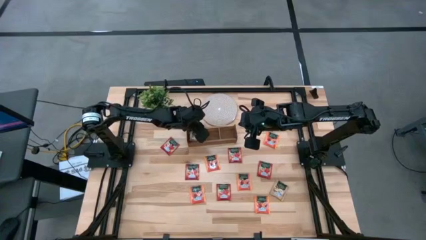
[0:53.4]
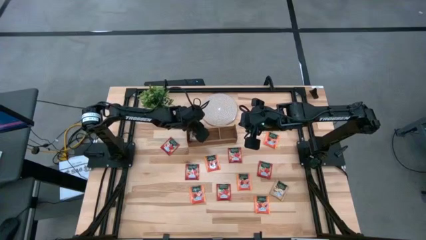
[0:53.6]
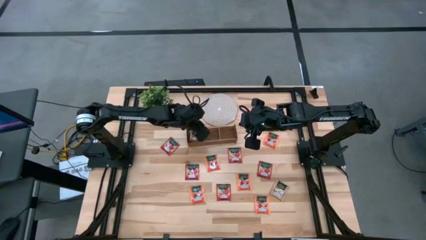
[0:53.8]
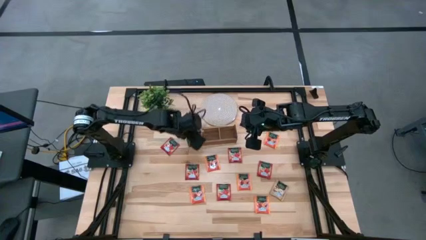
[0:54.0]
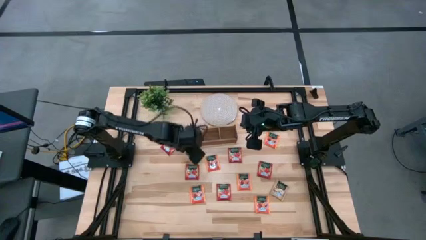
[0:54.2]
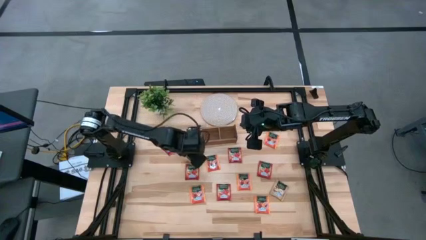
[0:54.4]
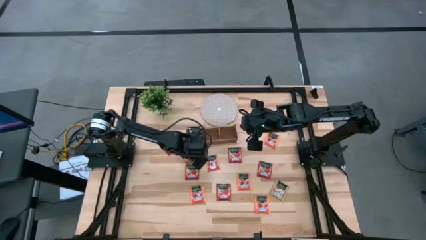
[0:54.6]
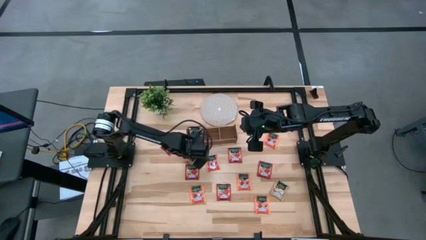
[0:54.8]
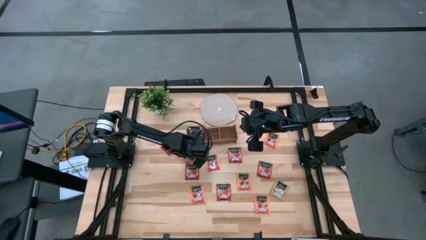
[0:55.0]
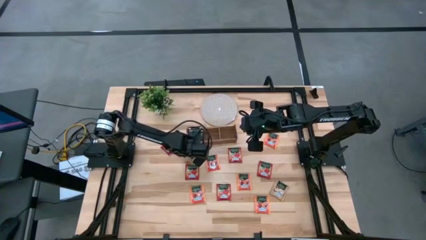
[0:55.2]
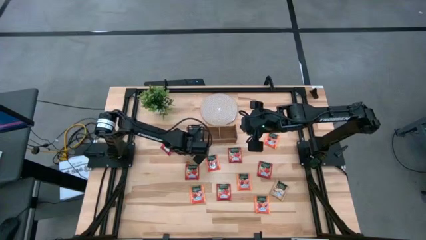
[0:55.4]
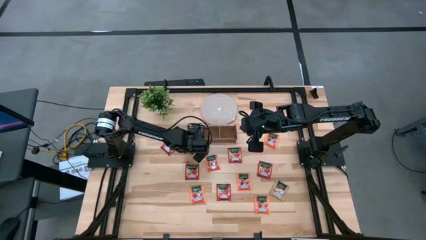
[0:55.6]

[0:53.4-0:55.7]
Task: Pick & Place Tea
Adjust the wooden organizer

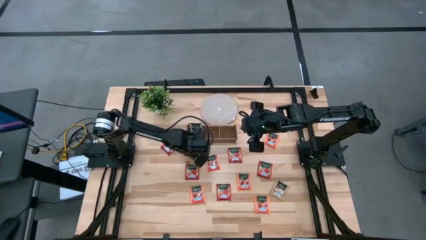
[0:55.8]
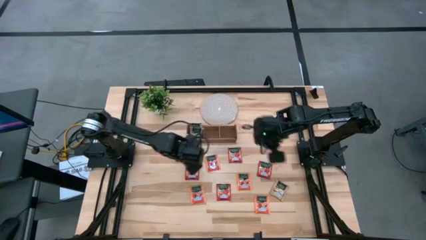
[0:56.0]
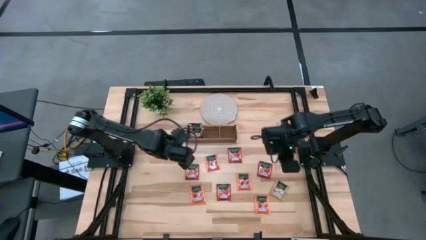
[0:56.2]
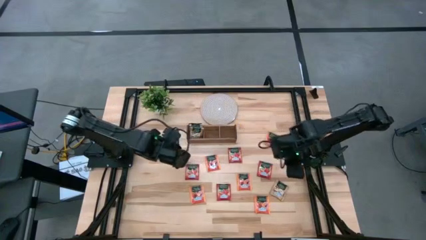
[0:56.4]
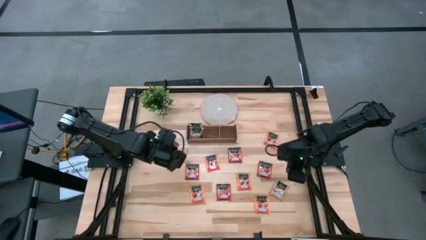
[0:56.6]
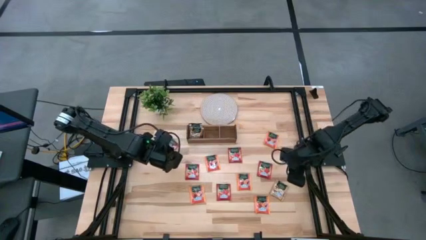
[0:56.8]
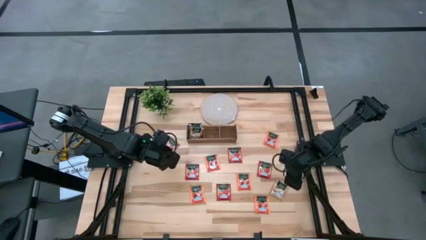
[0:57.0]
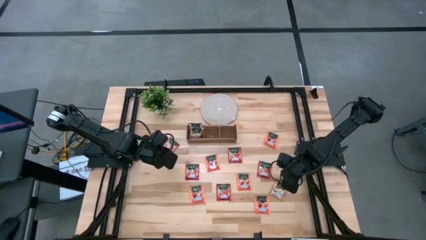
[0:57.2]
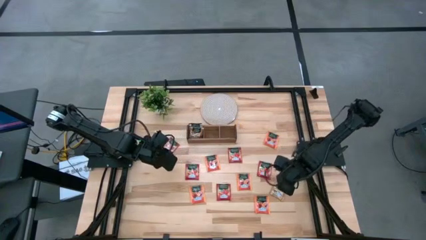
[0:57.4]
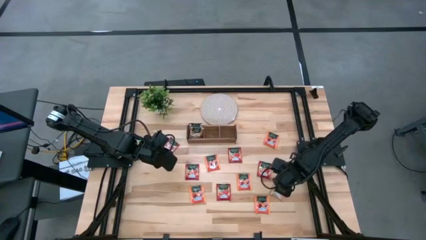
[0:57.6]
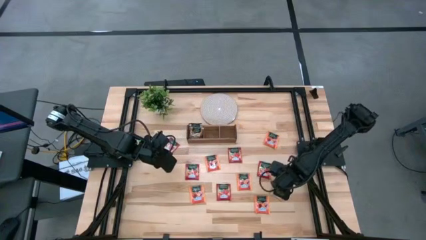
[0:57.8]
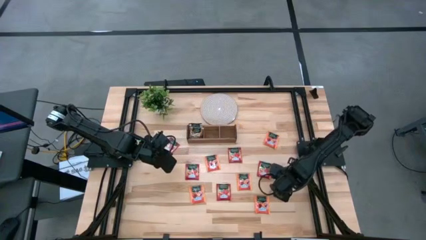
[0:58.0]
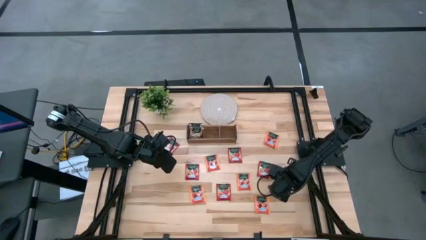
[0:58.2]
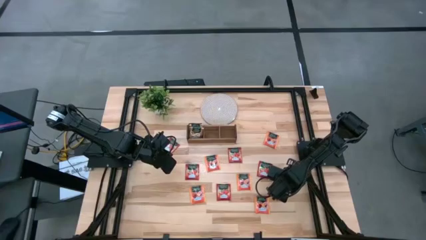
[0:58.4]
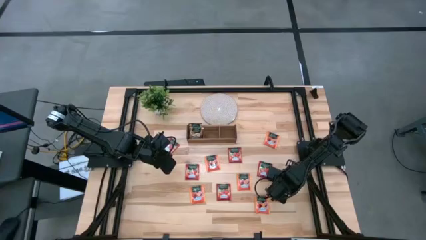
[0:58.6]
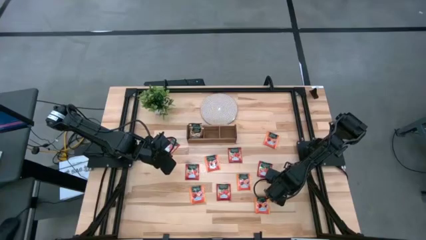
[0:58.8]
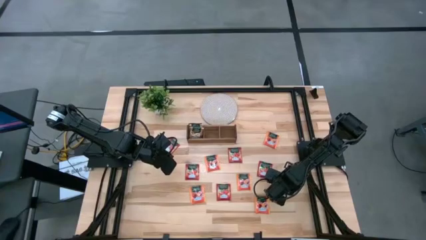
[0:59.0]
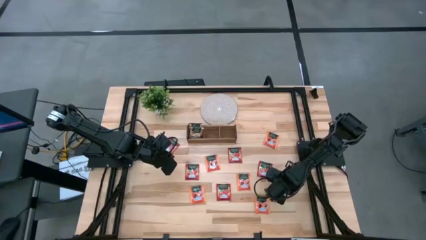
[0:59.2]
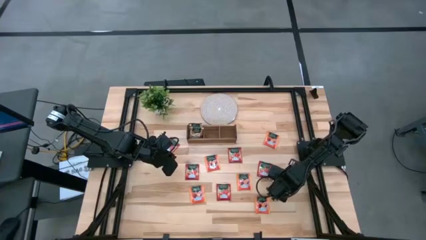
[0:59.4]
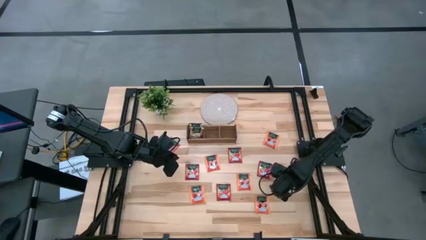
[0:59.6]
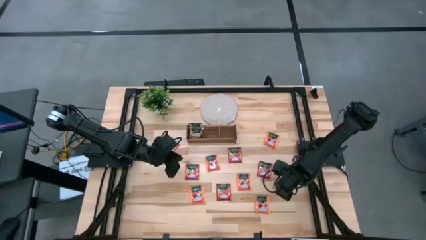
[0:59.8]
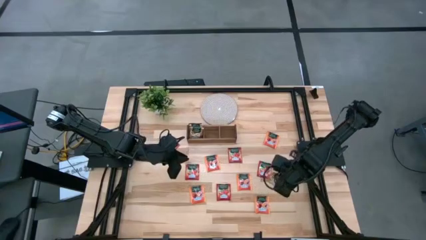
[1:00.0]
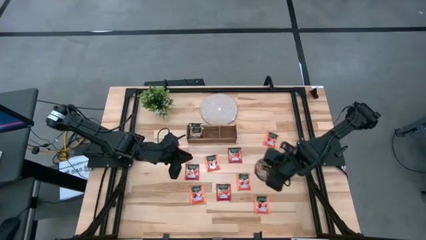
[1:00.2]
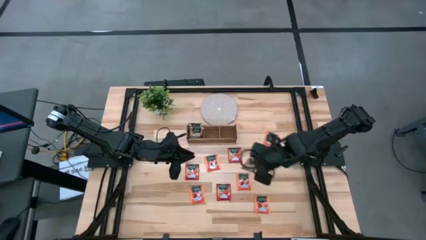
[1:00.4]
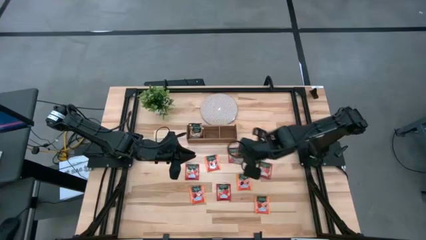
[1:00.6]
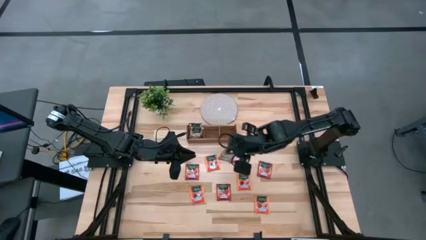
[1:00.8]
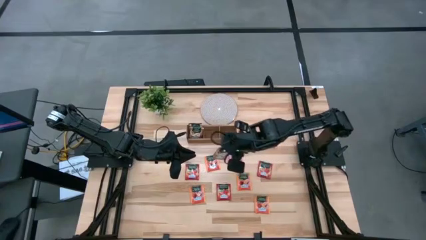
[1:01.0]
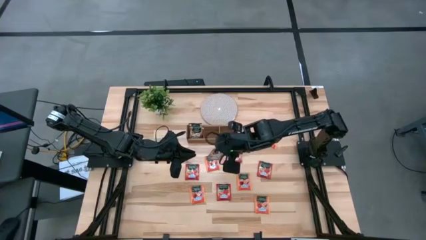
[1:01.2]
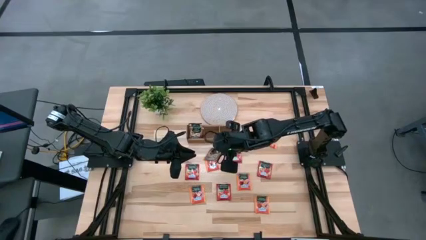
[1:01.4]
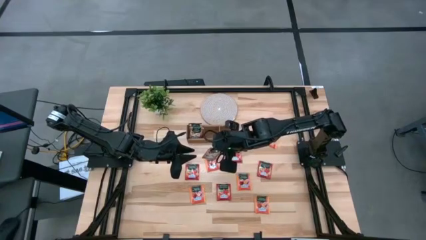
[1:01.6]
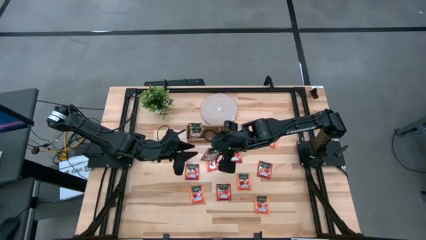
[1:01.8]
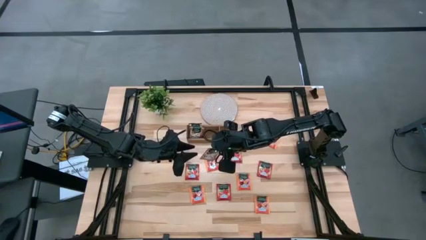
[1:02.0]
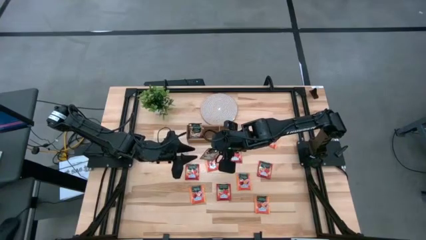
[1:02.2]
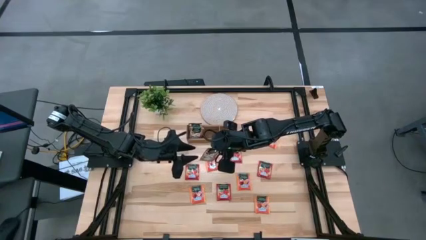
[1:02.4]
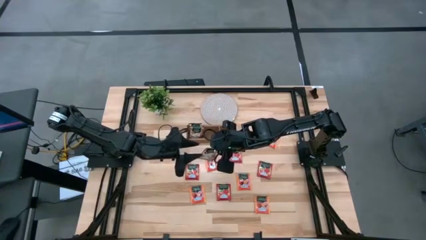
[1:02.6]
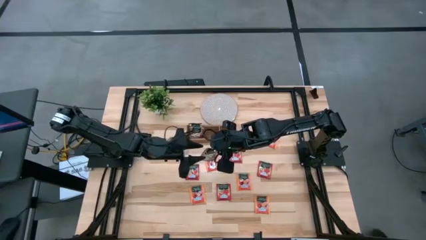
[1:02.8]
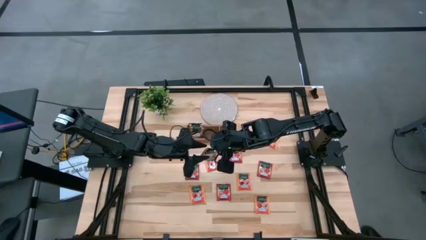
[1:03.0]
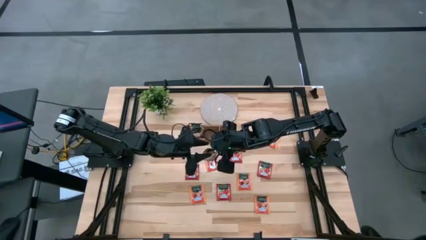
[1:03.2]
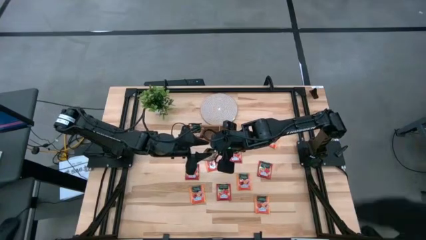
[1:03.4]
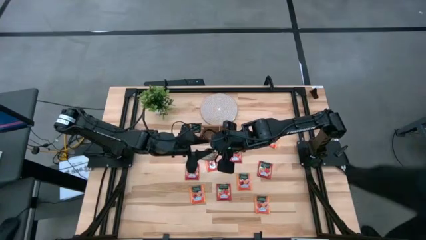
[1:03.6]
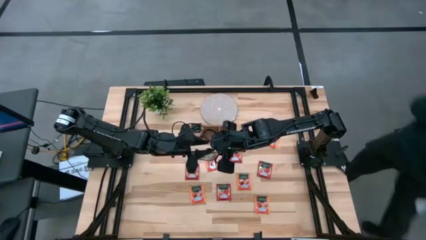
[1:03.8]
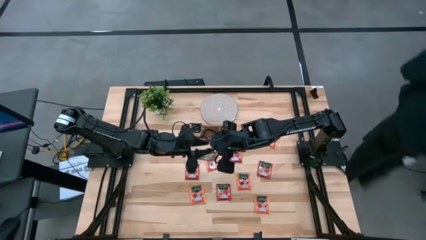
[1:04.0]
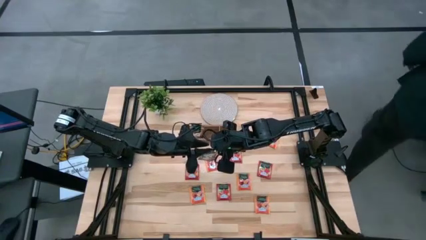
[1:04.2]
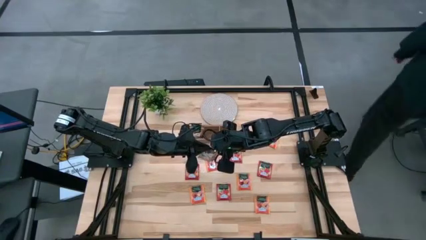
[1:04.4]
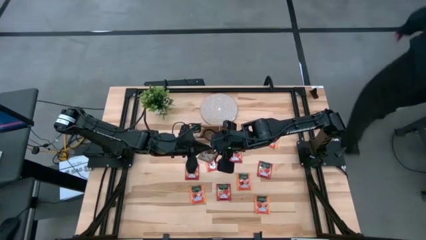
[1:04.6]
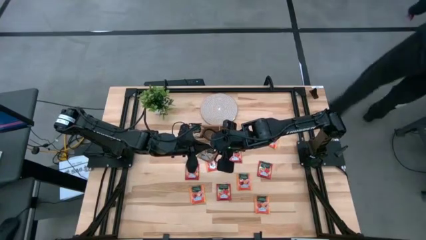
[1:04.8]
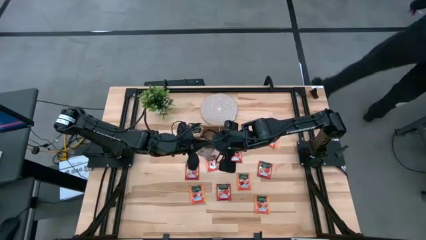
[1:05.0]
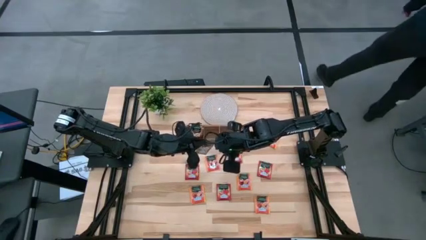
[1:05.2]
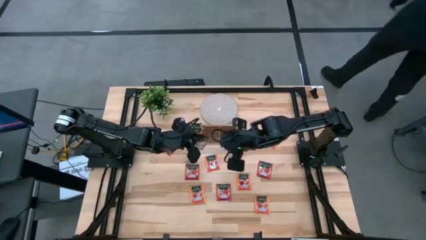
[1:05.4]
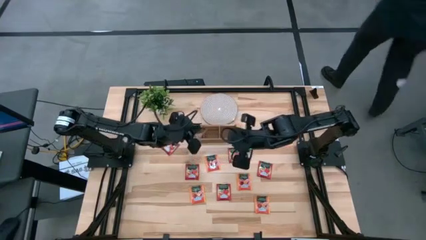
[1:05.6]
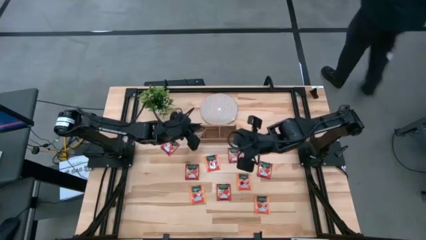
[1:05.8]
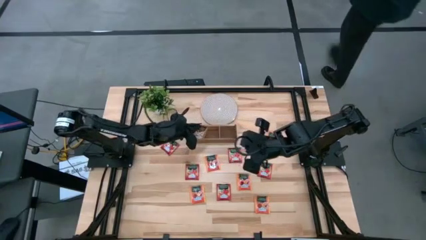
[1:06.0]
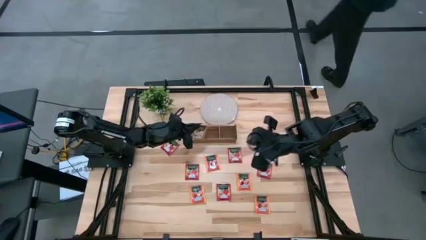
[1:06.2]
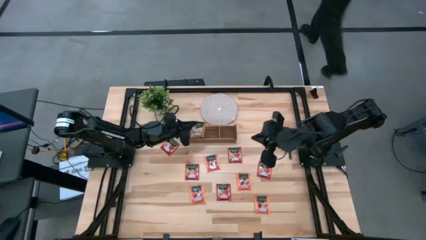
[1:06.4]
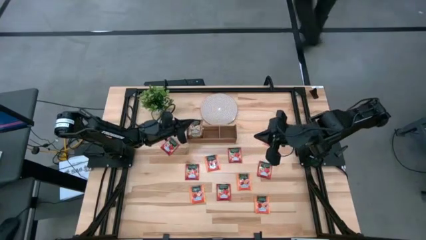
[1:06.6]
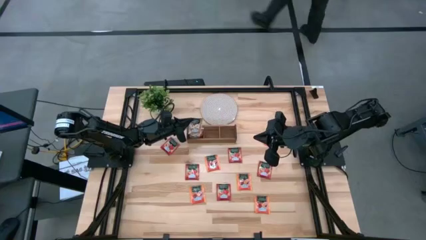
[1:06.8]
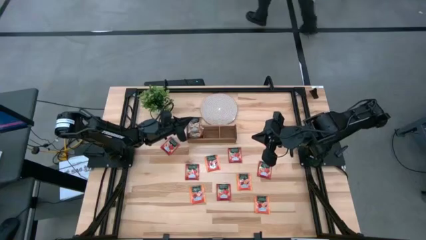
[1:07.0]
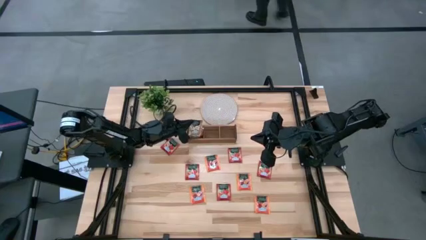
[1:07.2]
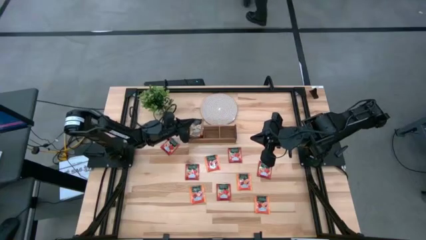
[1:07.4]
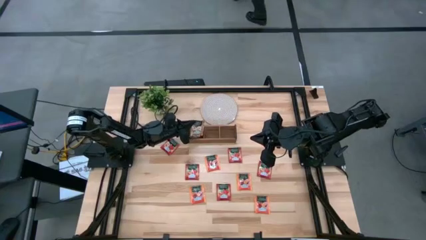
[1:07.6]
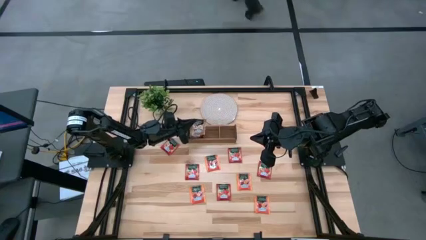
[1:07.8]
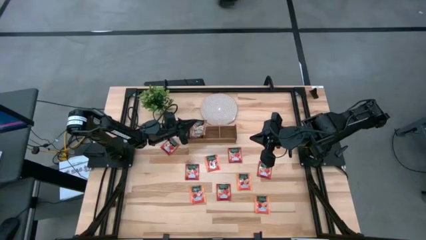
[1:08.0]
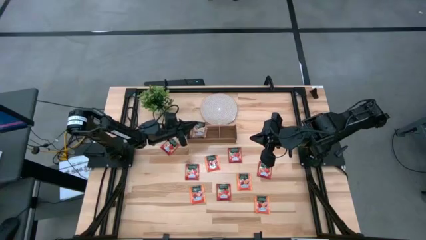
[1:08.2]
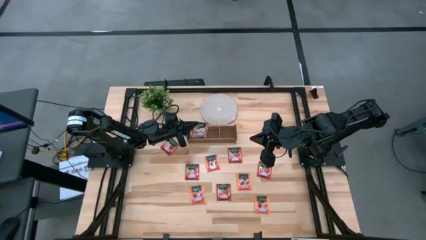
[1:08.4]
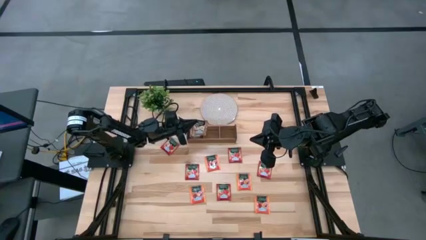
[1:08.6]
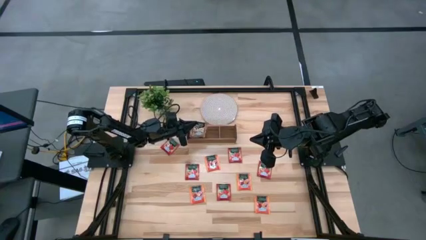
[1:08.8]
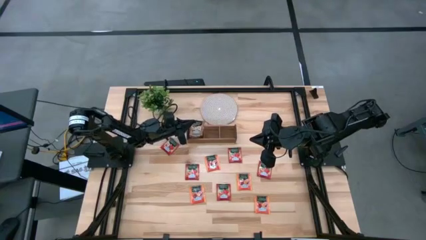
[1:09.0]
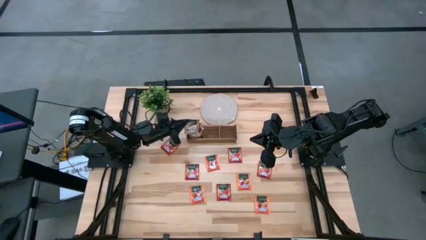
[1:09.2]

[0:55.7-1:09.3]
Put the brown tea bag into the left of the wooden organizer
